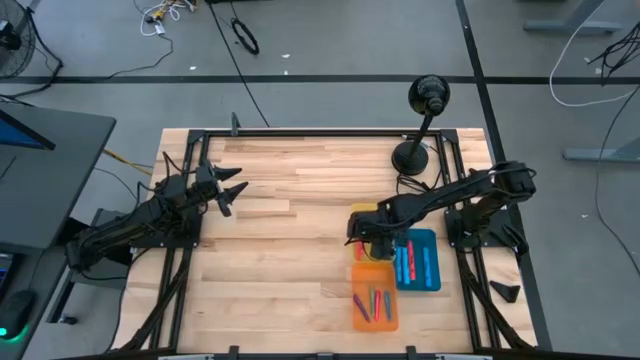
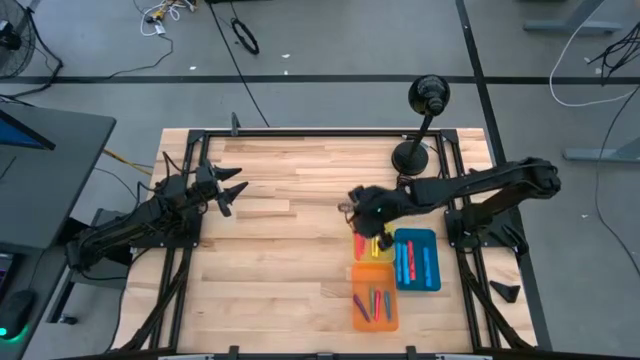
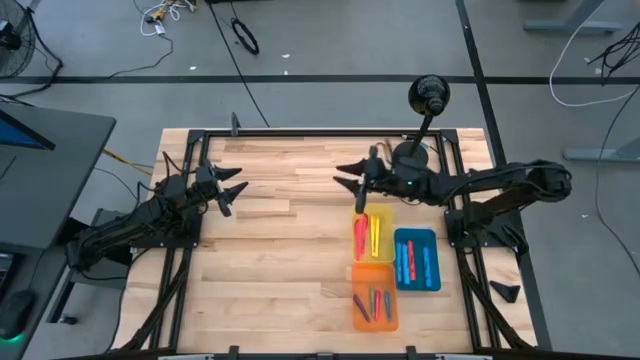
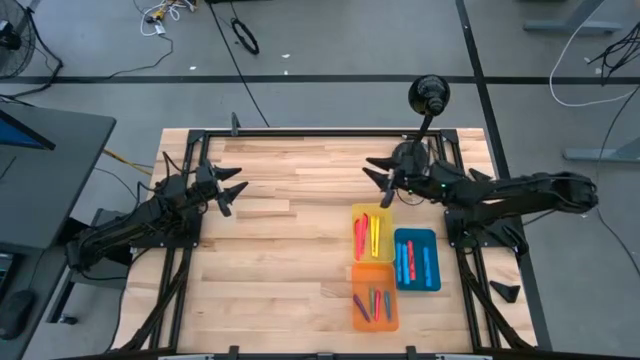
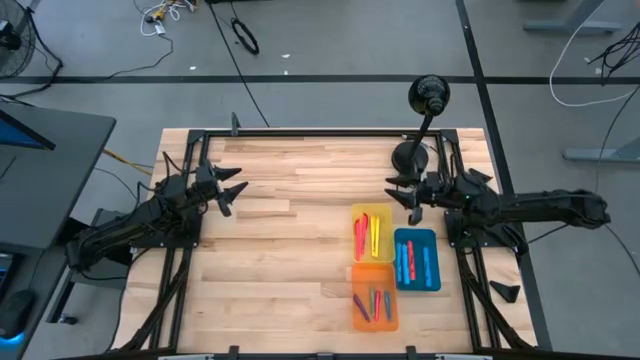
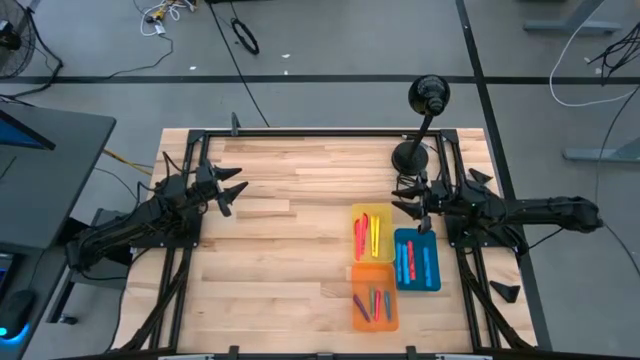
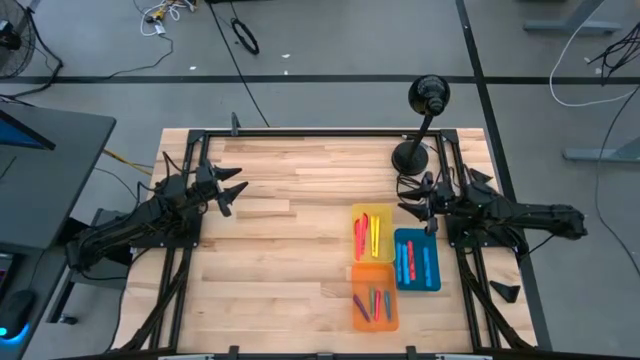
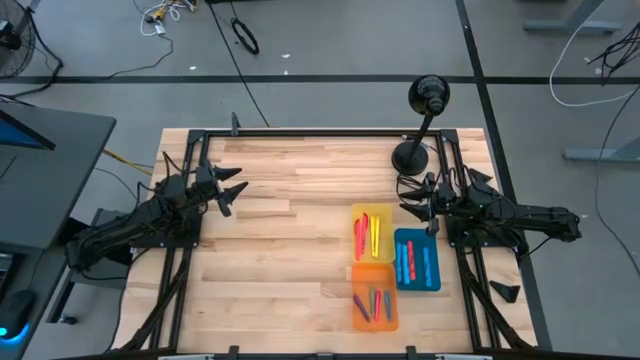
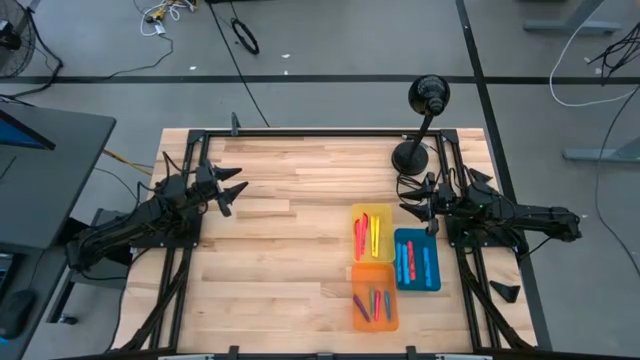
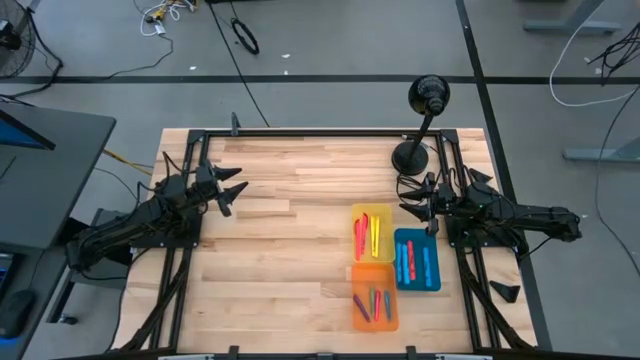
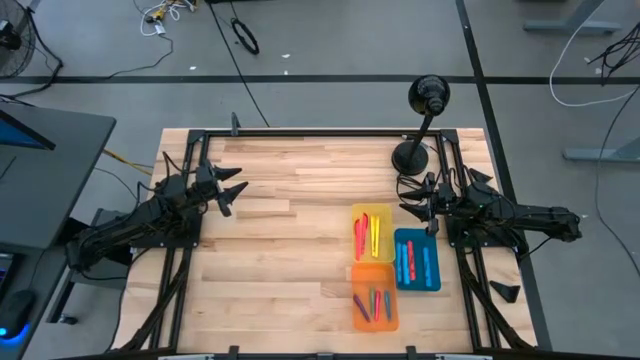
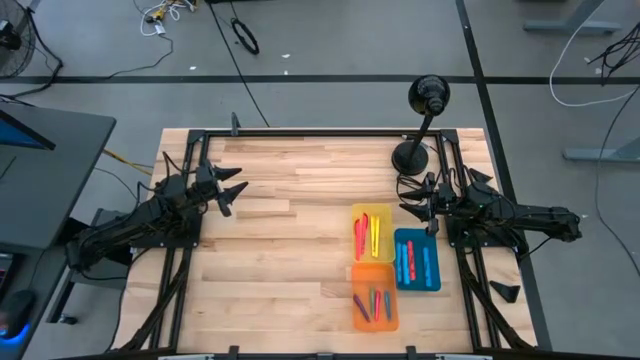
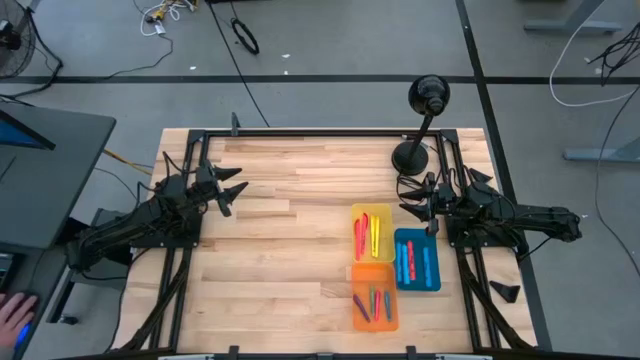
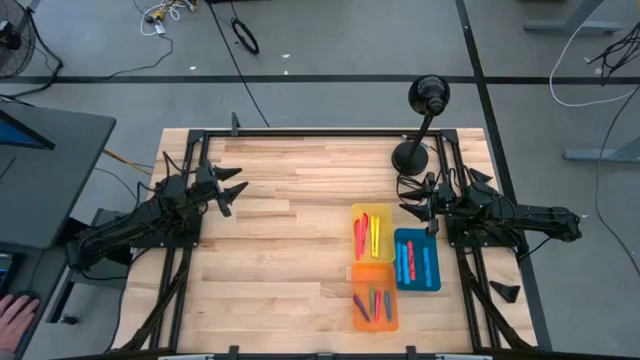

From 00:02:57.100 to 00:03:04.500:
Task: Pick & Place Markers
Return to Home Position

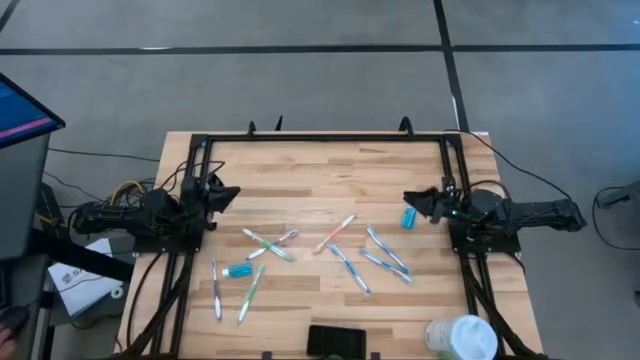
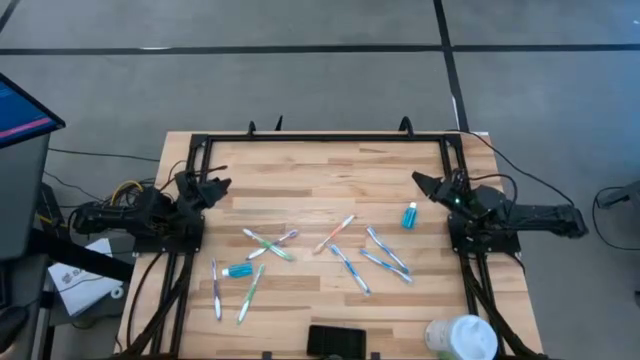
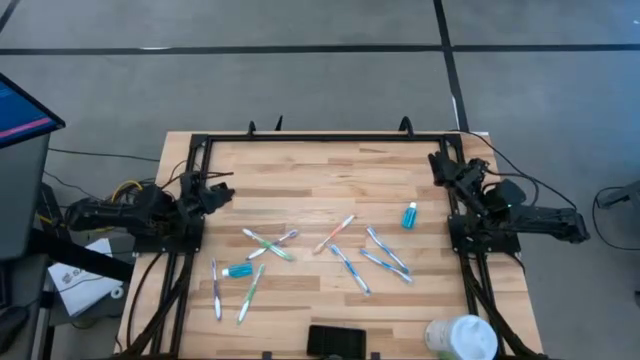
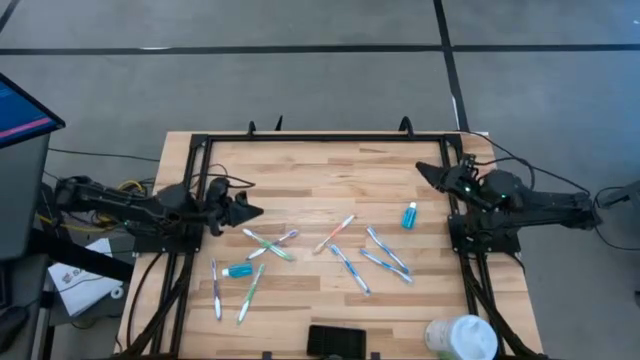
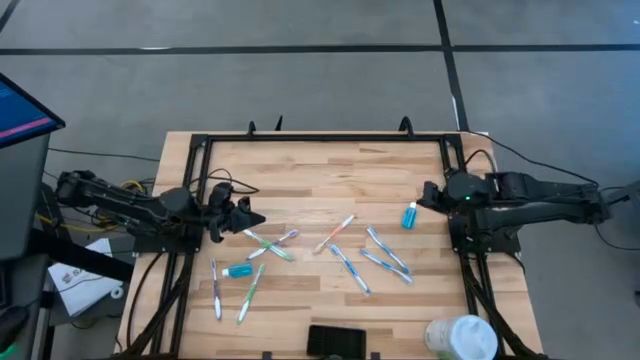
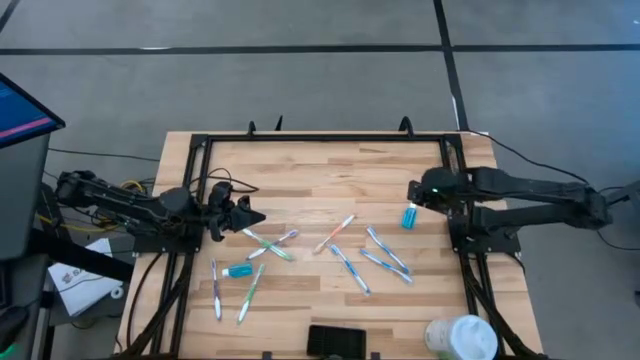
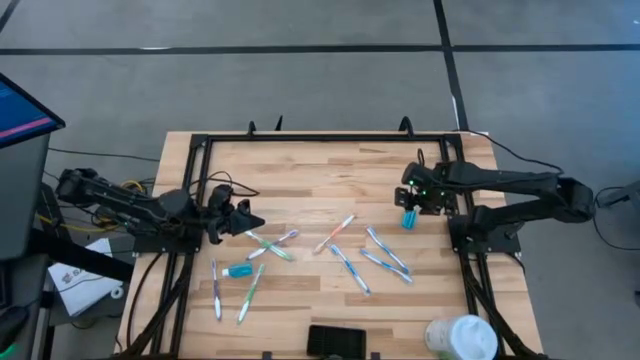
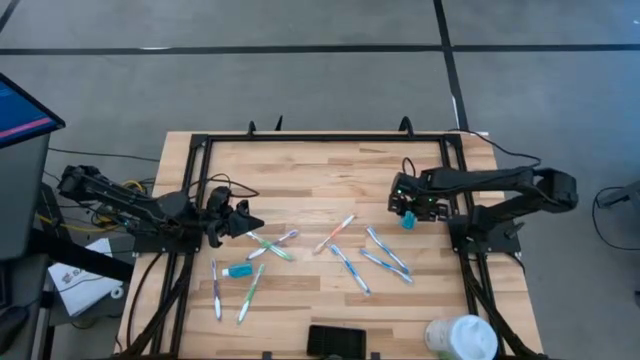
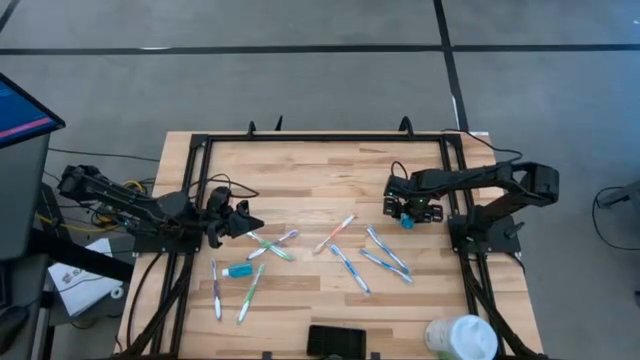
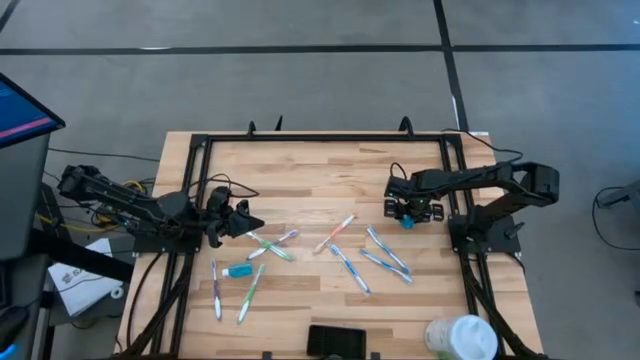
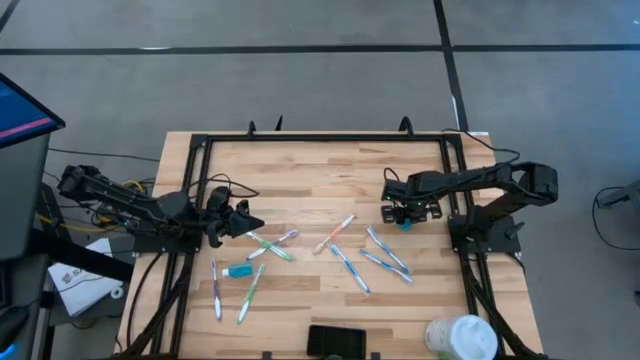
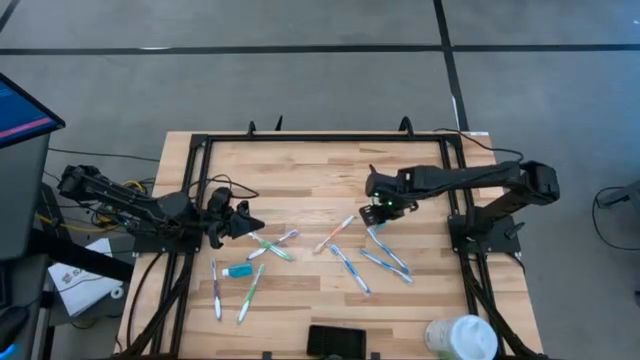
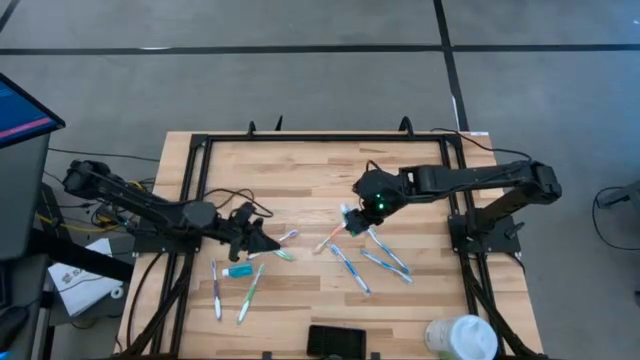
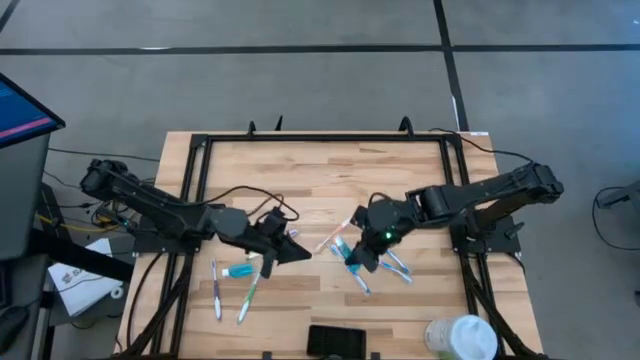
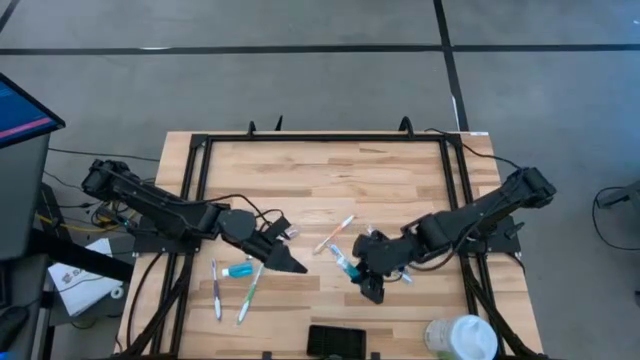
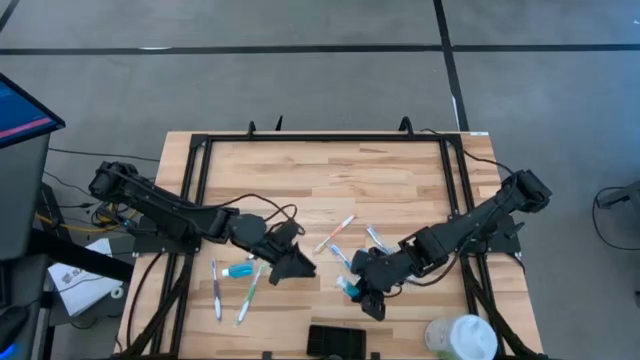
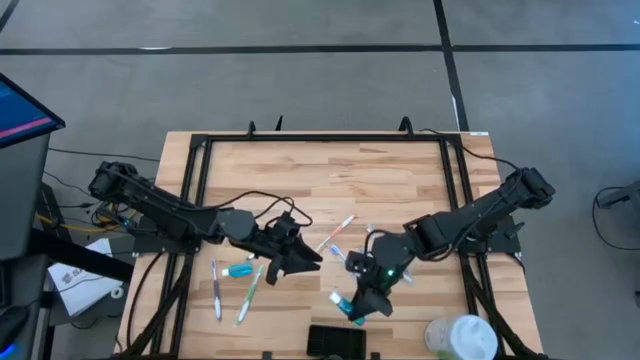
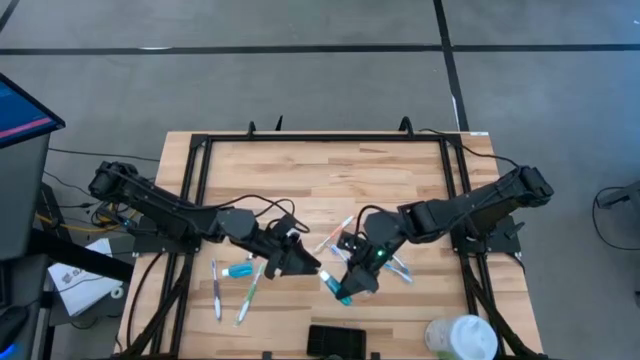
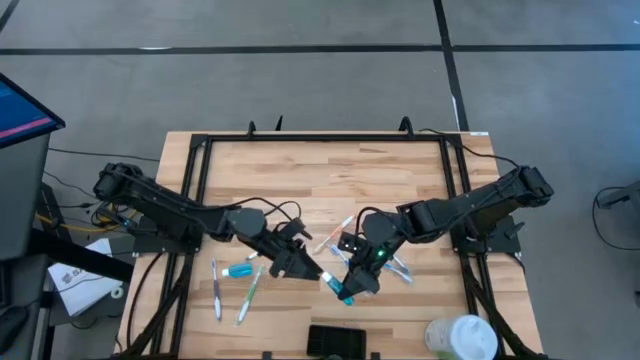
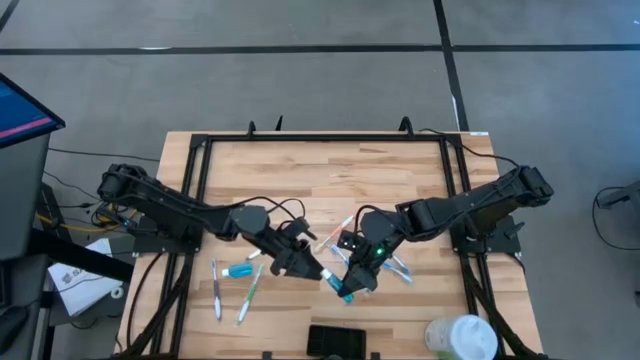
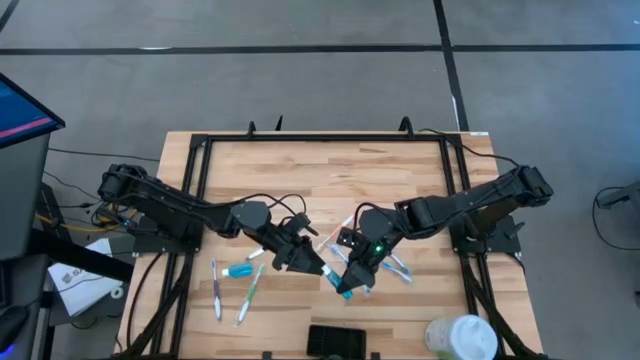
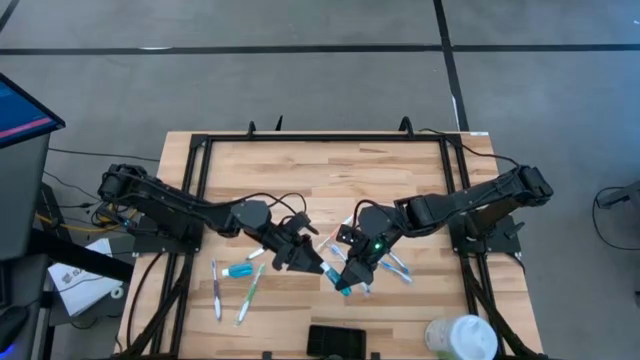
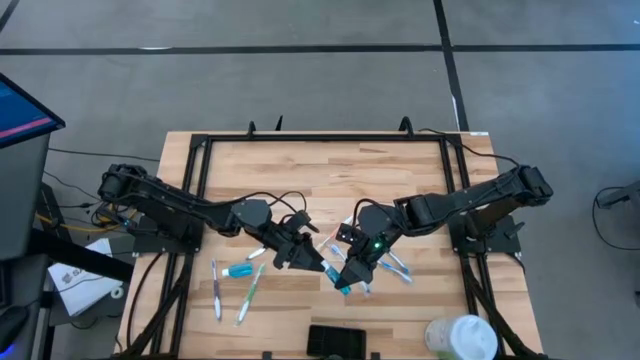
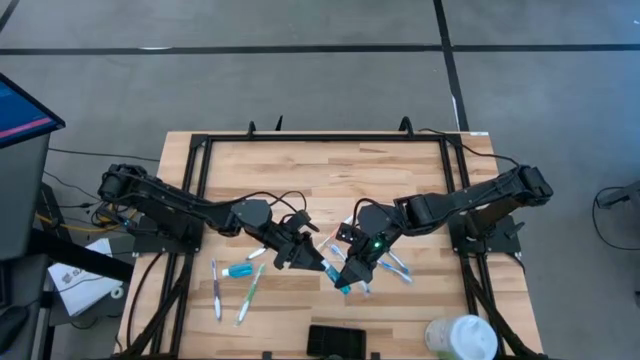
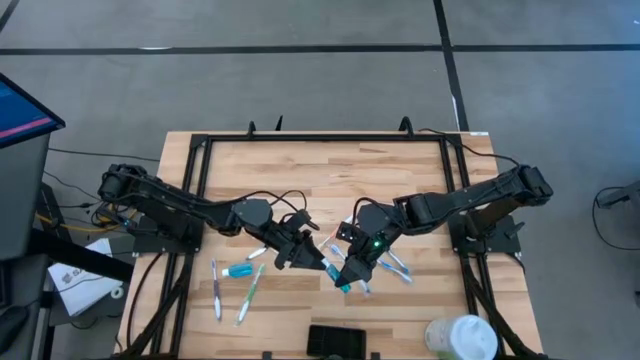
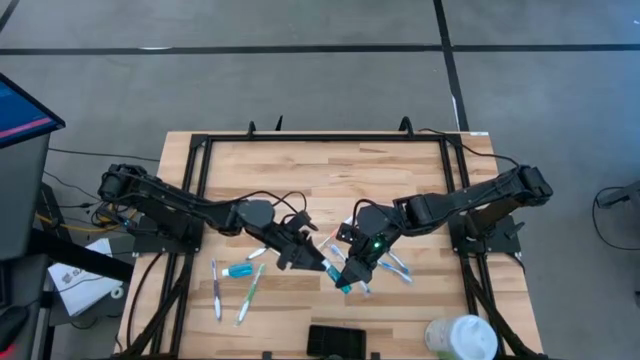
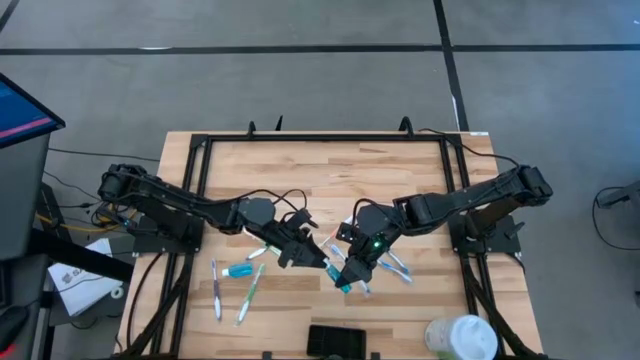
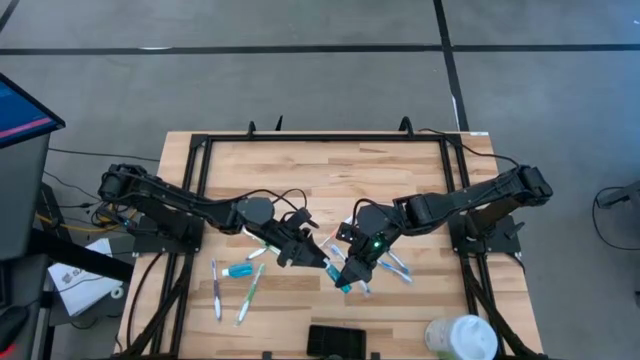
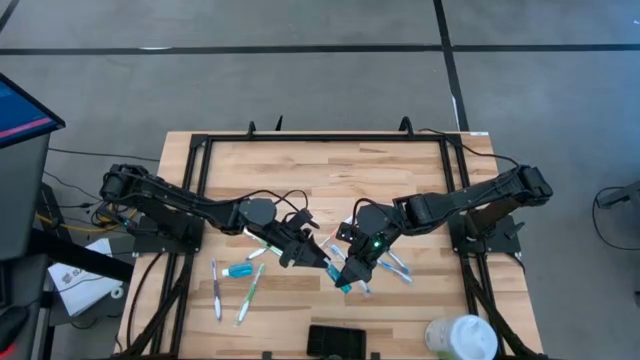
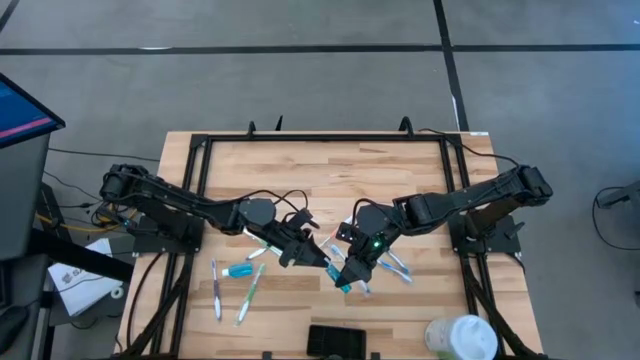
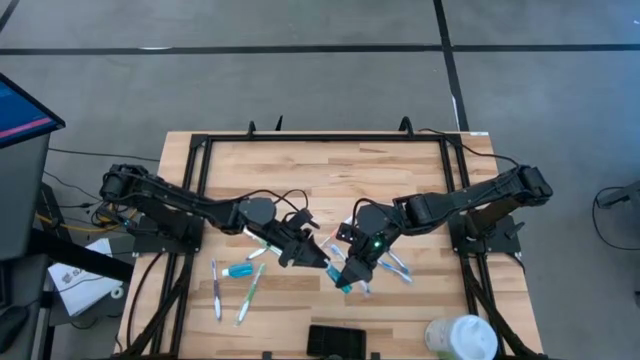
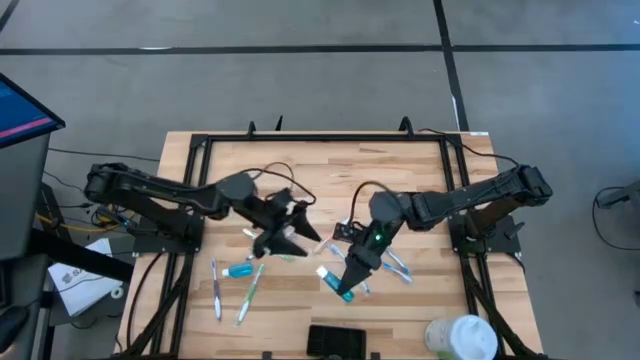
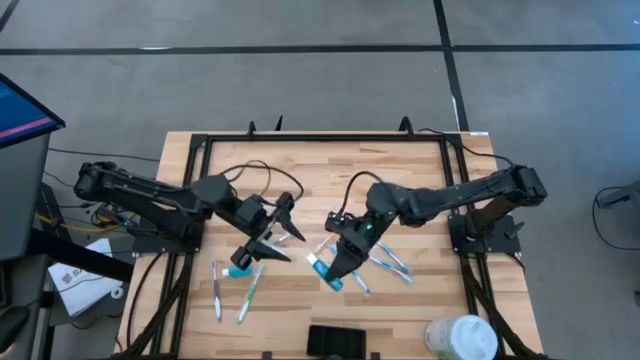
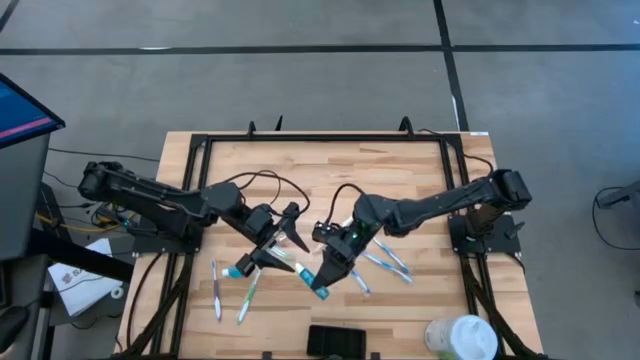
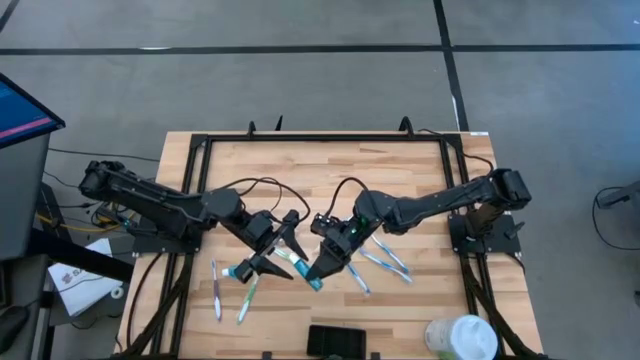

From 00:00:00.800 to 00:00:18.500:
Task: Pick & Place toothbrushing station
Put the right blue mouthwash into the black mesh organizer
